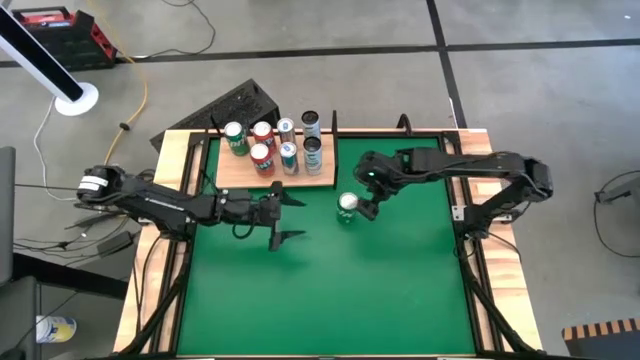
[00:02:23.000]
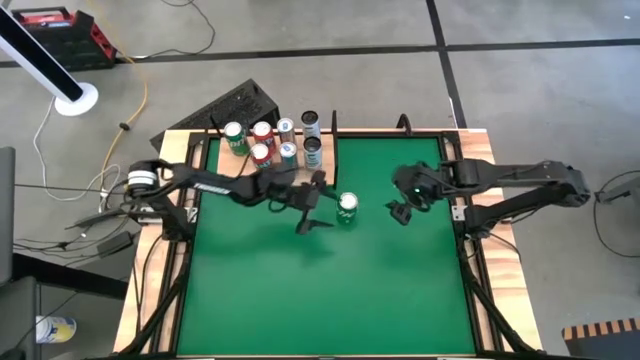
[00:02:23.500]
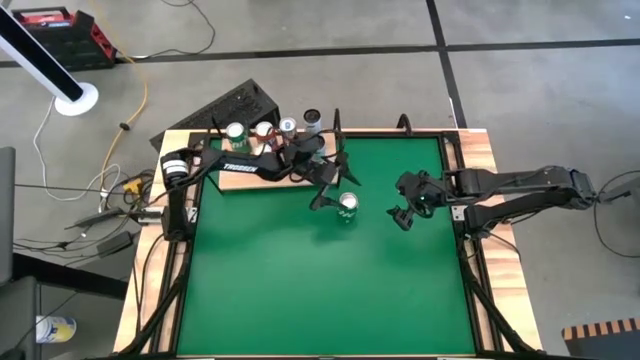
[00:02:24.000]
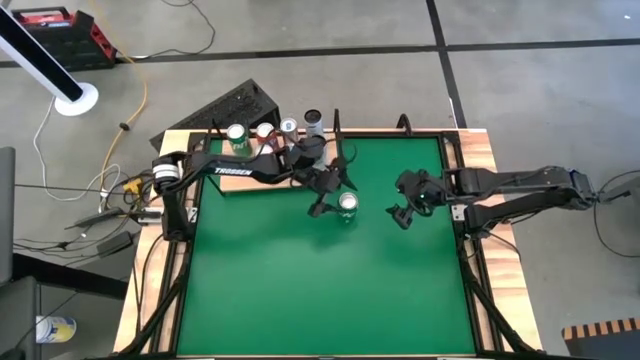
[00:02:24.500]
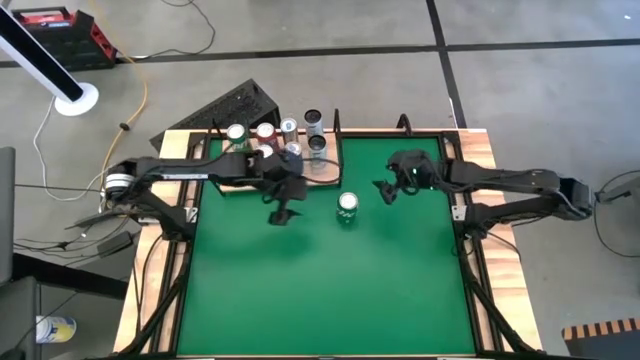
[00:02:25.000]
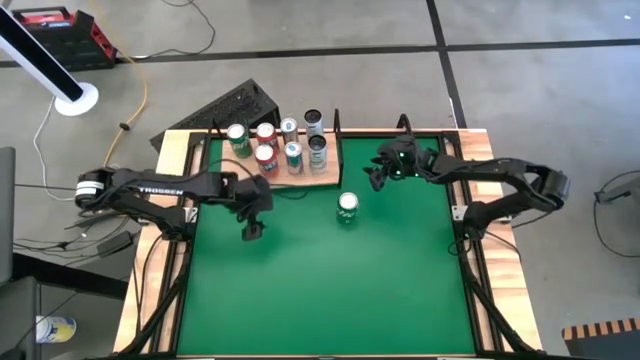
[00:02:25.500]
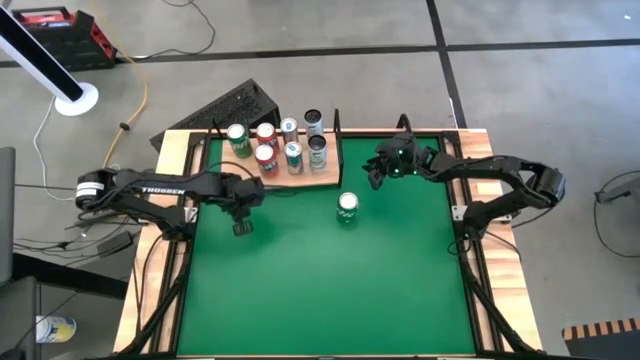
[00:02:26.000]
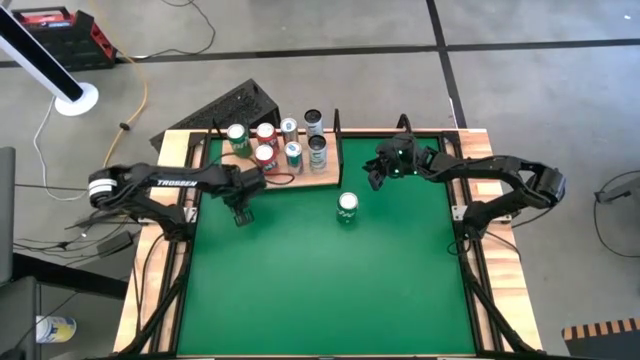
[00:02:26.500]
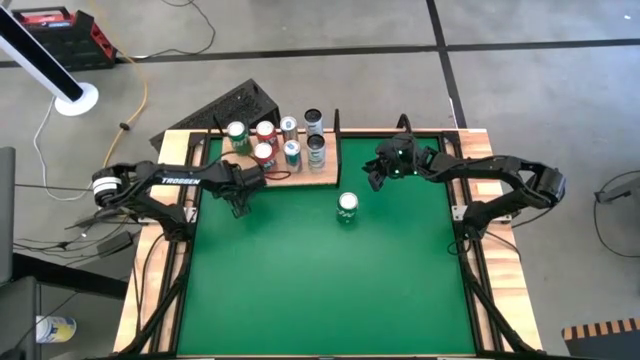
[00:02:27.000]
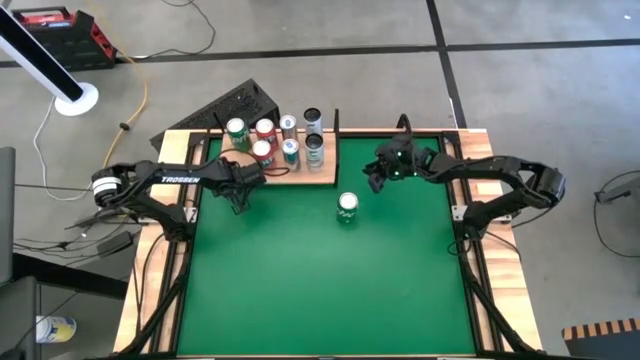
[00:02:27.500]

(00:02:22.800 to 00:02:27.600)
Task: Place canned beverage on shelf
Adjust the shelf

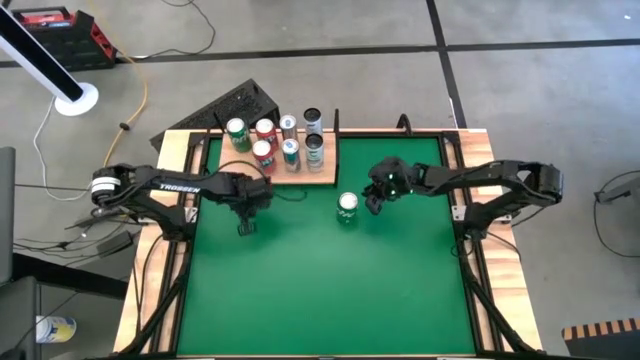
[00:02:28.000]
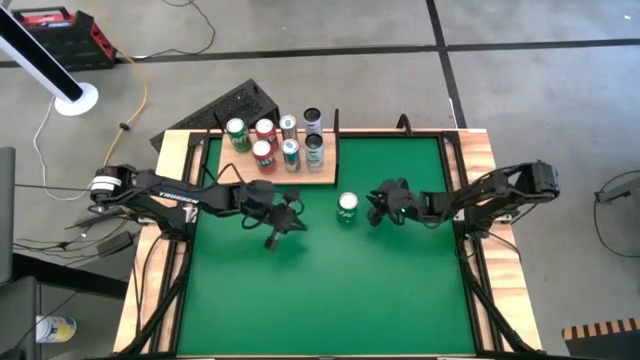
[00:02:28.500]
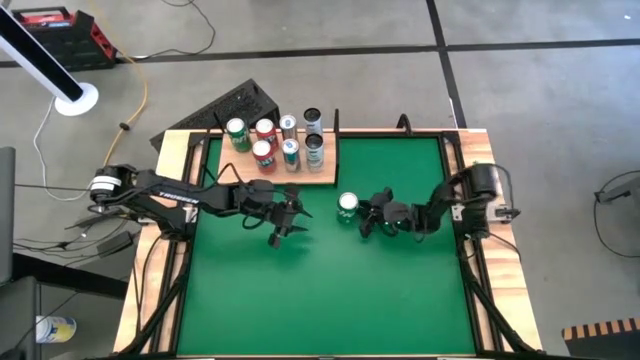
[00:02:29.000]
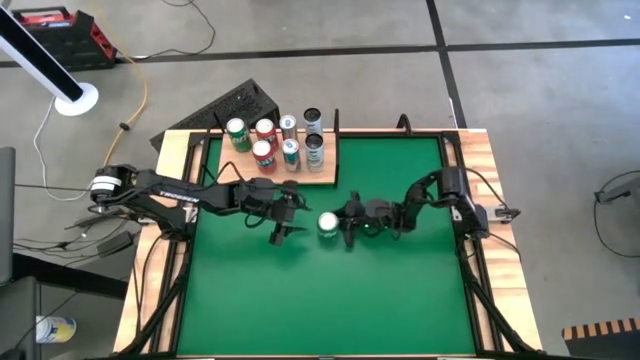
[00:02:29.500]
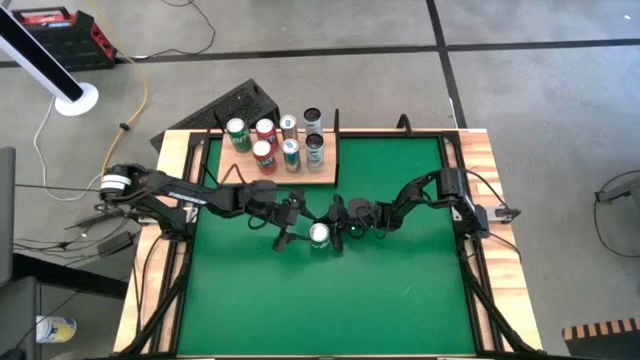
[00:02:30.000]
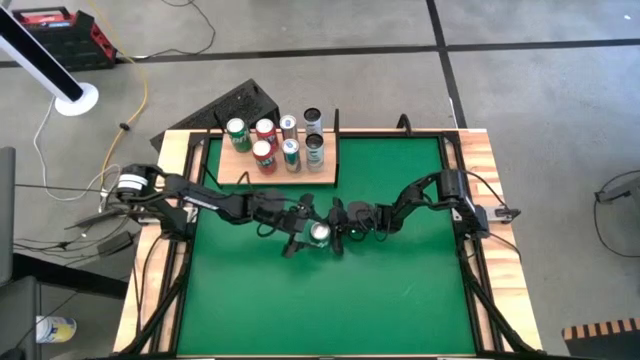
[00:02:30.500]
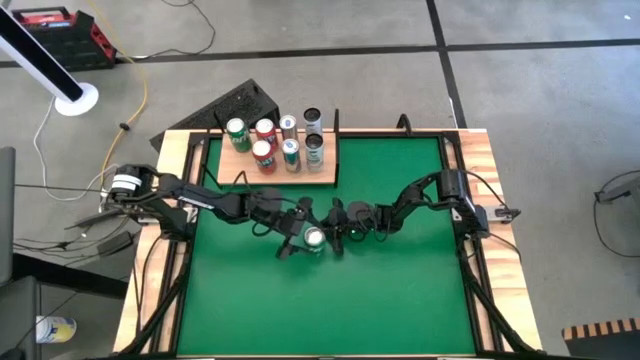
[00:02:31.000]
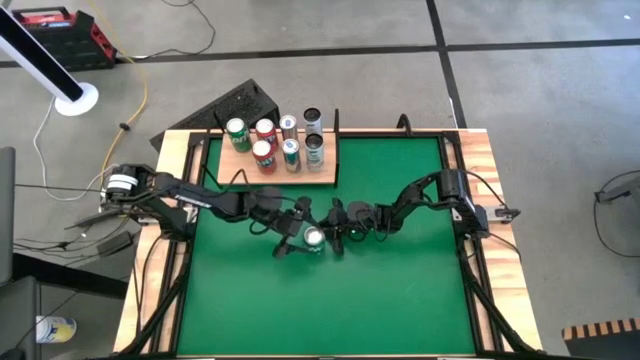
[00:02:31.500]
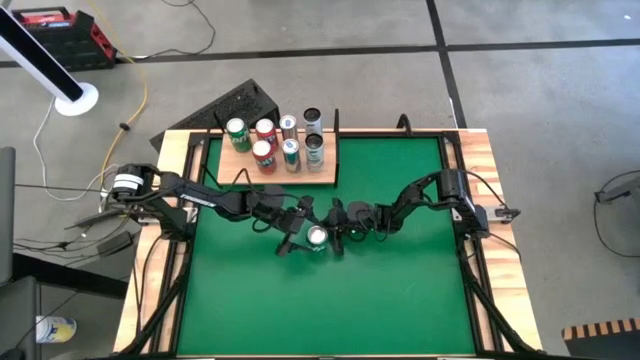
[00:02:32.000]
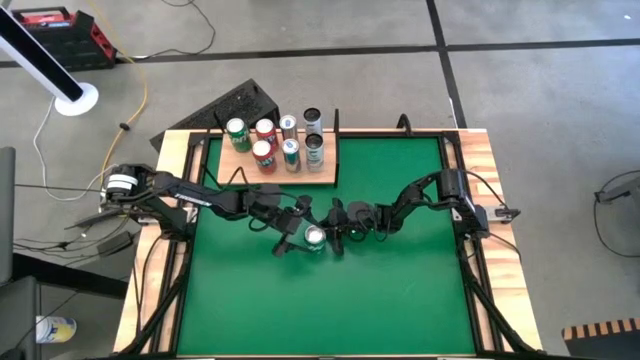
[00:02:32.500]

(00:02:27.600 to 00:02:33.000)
Put the green soda can on the shelf aligned with the other green soda can

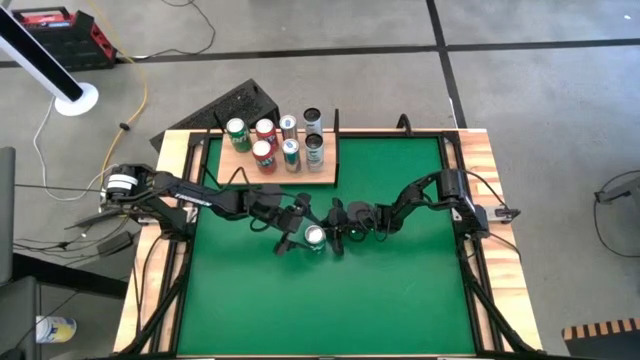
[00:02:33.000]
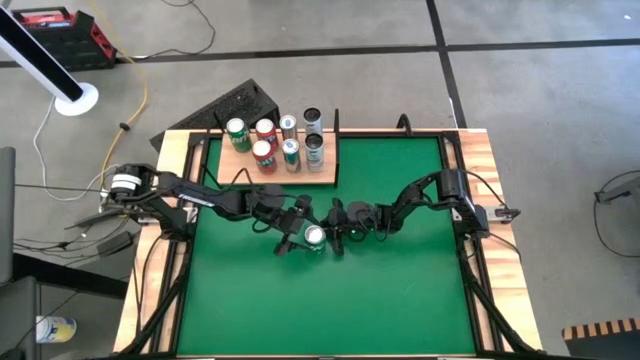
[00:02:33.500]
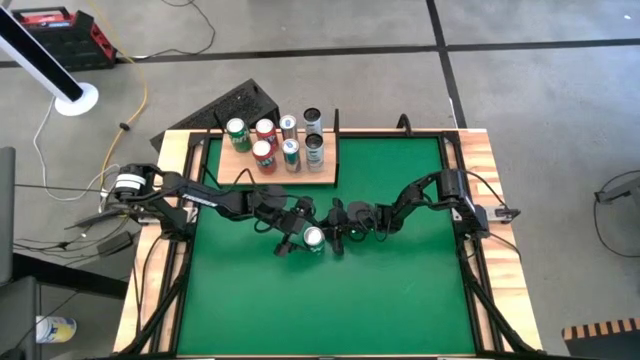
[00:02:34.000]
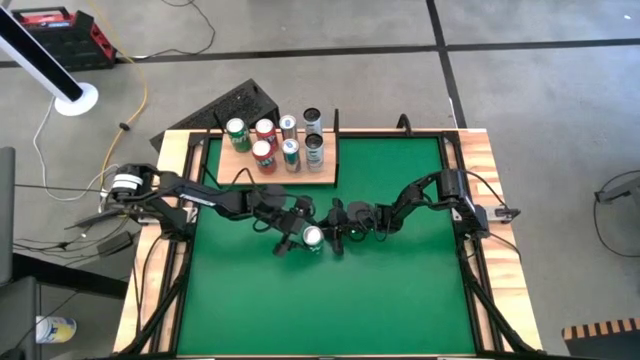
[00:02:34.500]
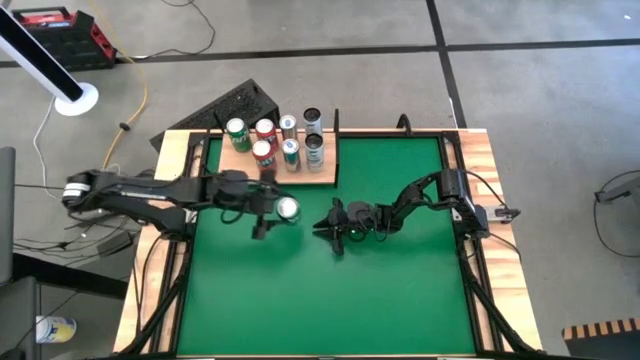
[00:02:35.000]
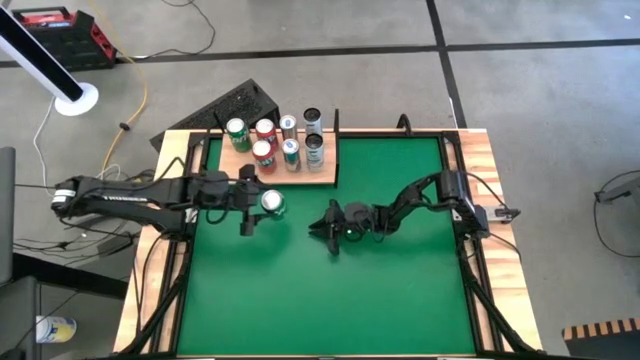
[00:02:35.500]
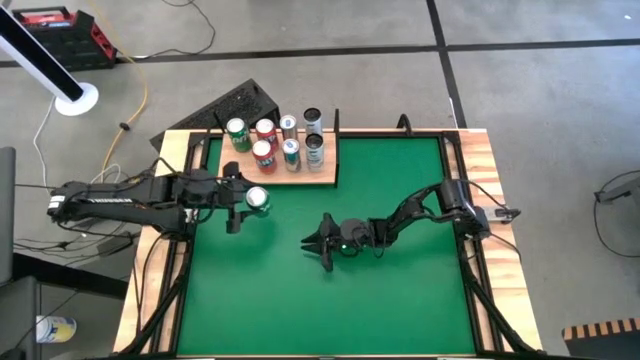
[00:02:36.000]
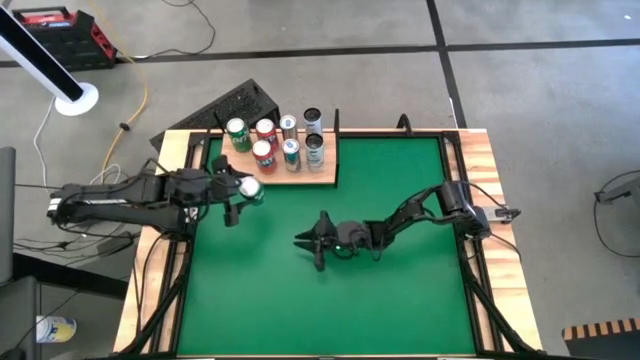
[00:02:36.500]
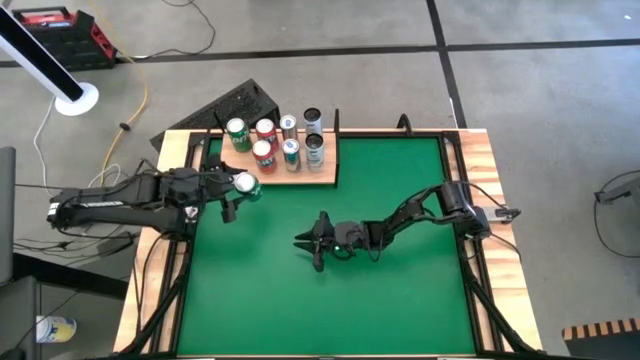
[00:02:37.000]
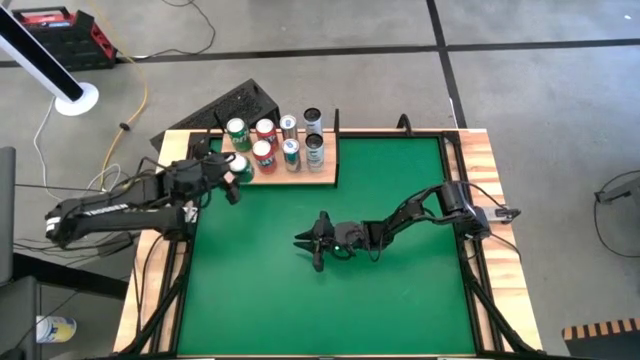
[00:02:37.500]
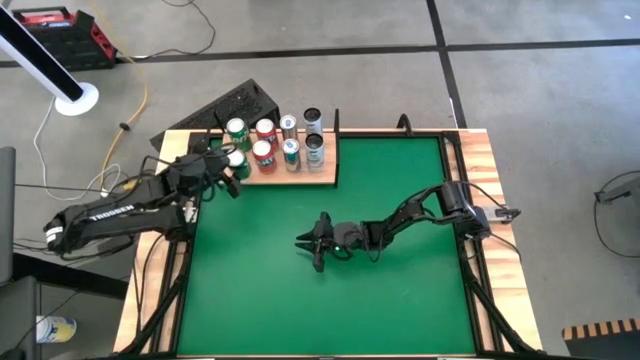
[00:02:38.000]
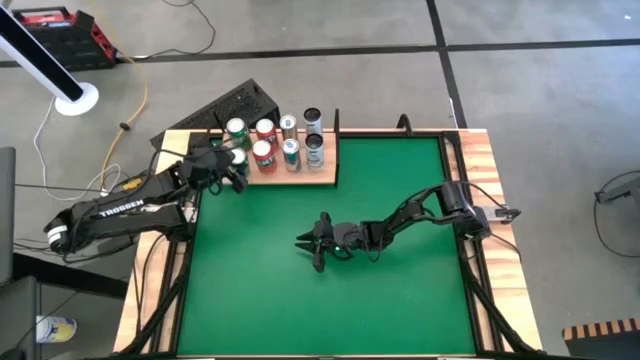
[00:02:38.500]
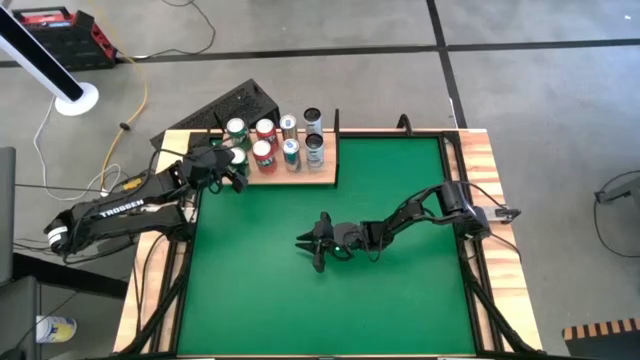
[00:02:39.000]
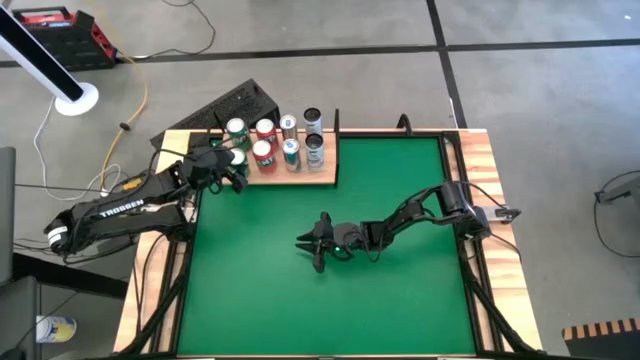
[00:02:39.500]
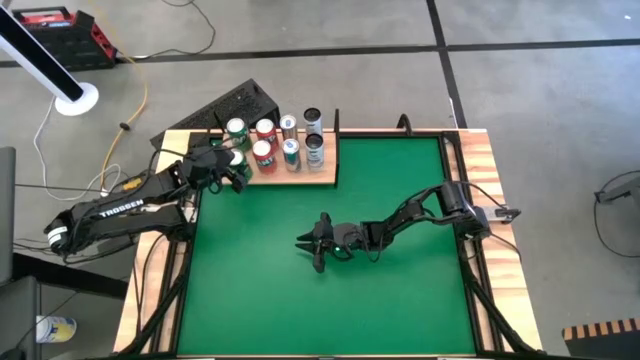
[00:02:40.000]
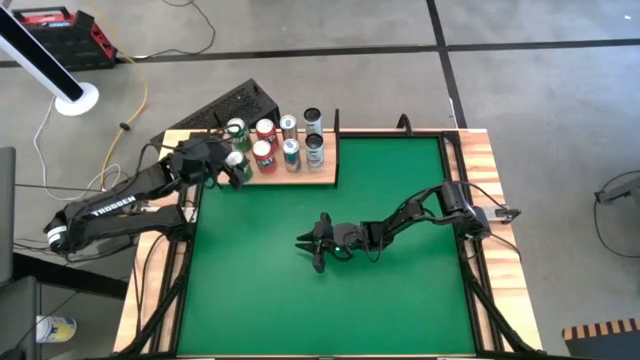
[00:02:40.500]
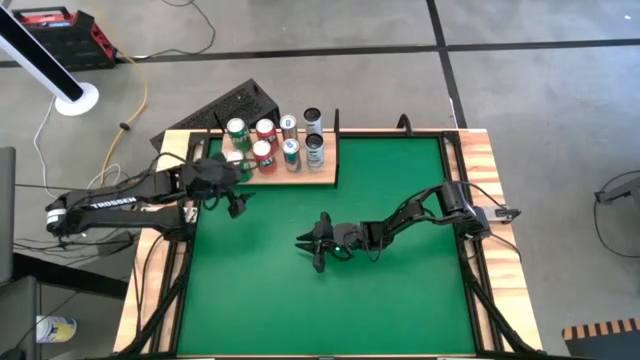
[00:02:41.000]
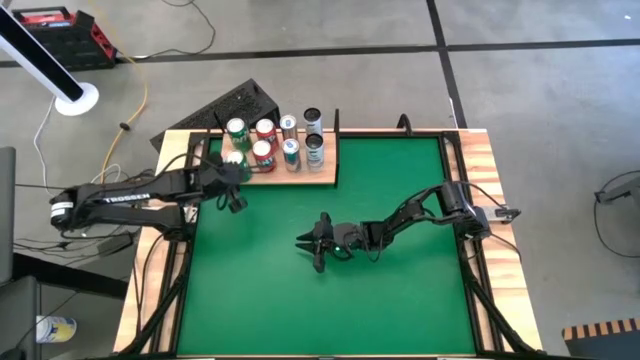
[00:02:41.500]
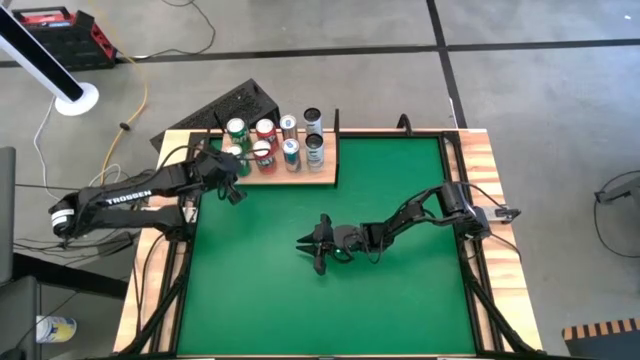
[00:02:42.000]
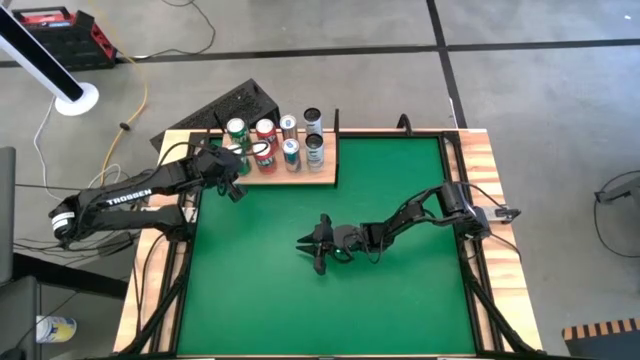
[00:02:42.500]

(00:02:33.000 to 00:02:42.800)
Put the green soda can on the shelf aligned with the other green soda can
